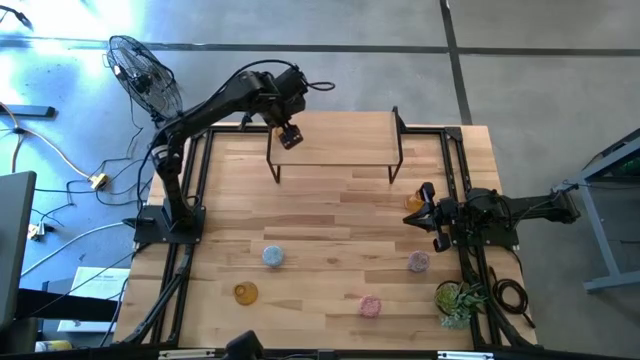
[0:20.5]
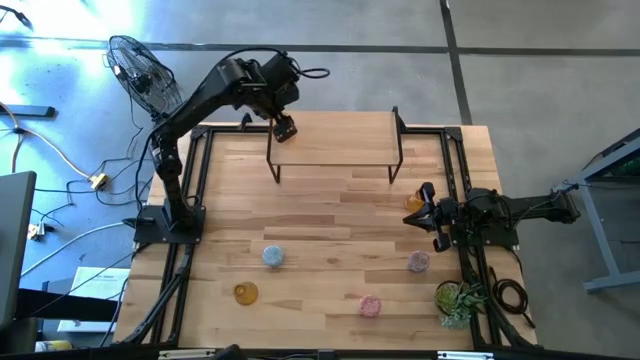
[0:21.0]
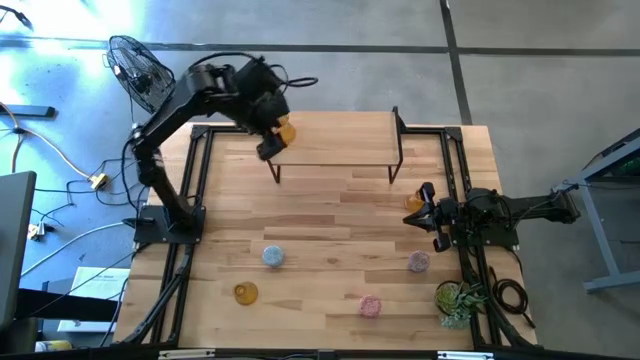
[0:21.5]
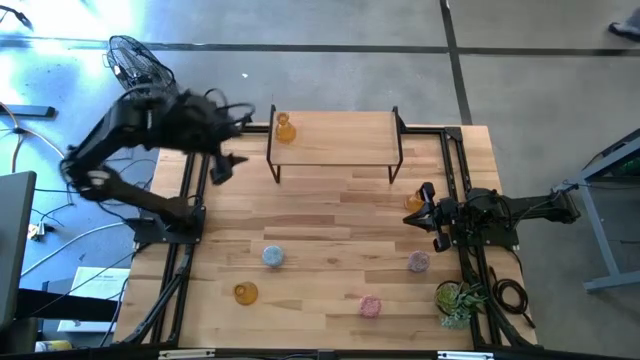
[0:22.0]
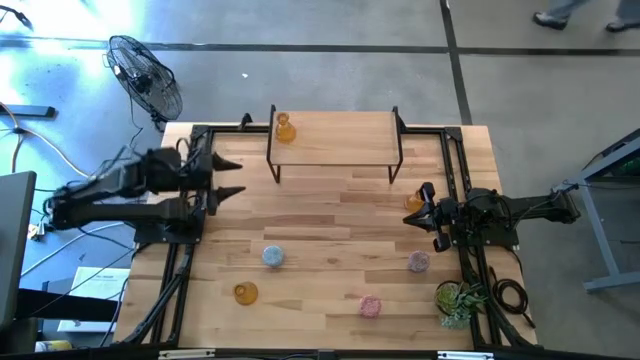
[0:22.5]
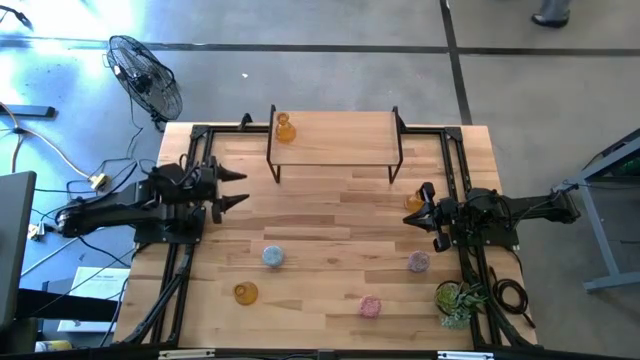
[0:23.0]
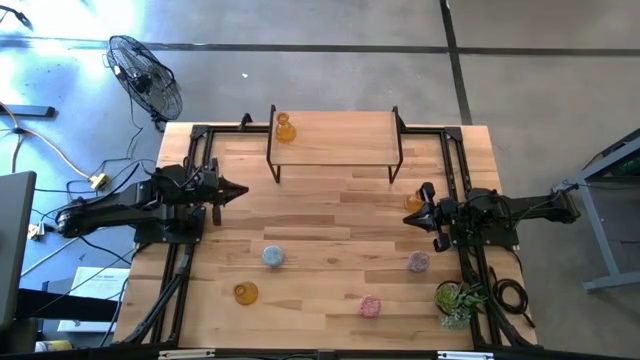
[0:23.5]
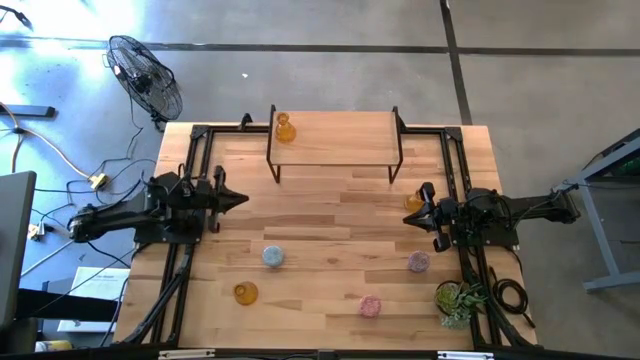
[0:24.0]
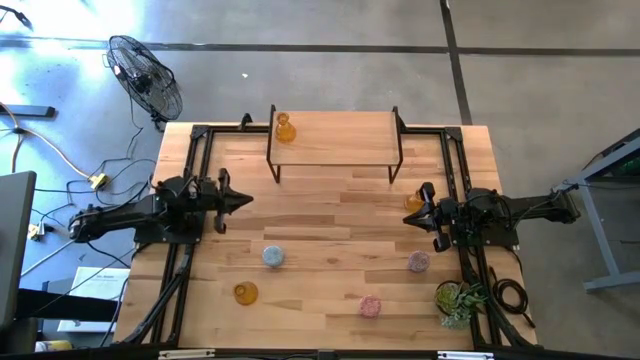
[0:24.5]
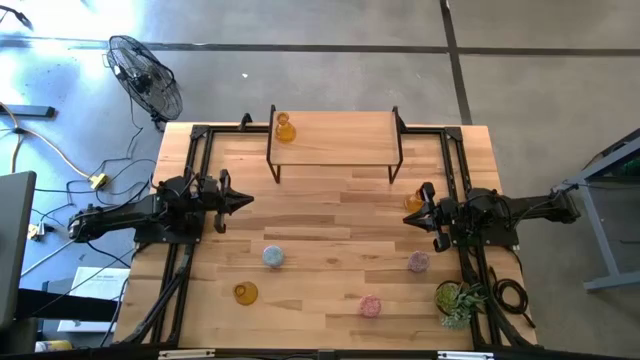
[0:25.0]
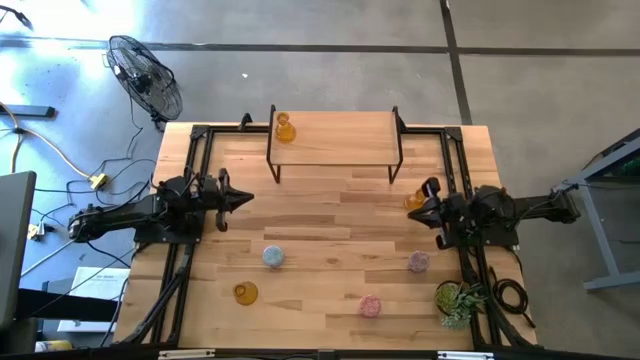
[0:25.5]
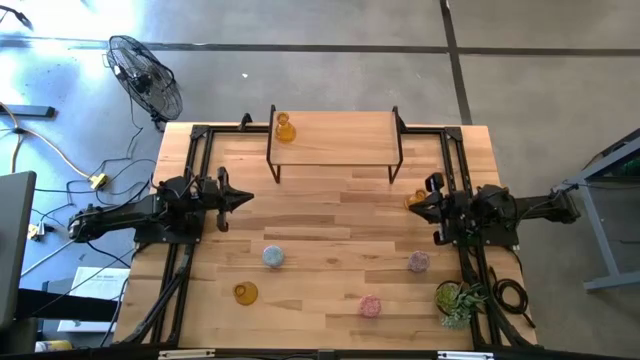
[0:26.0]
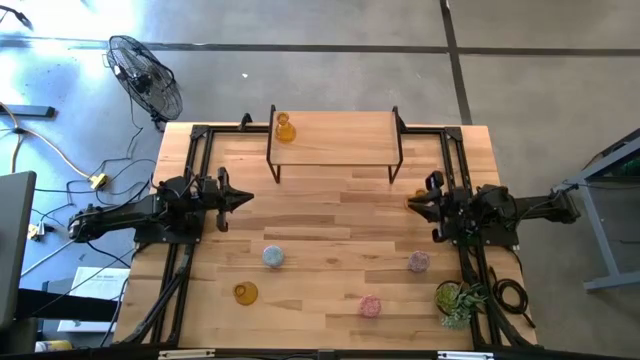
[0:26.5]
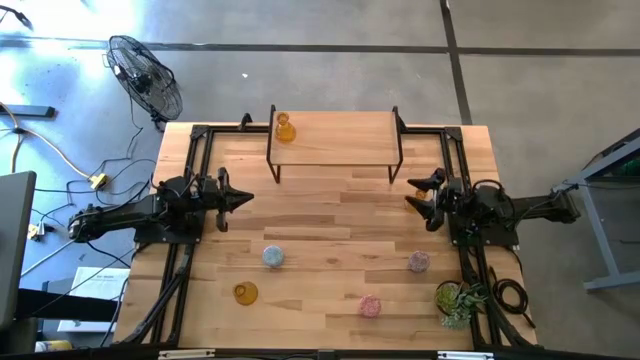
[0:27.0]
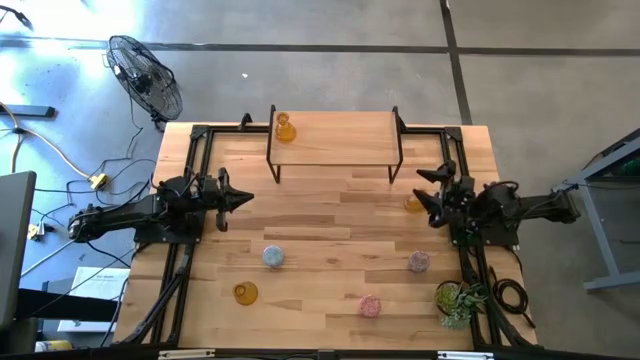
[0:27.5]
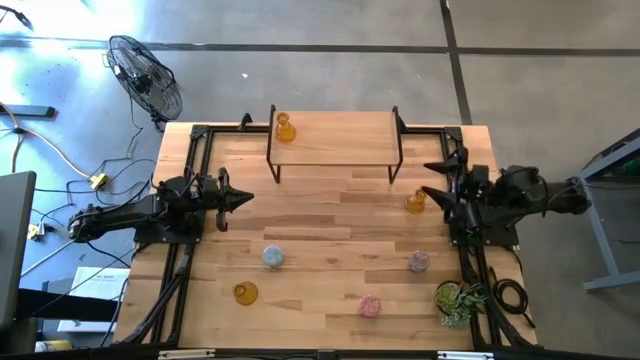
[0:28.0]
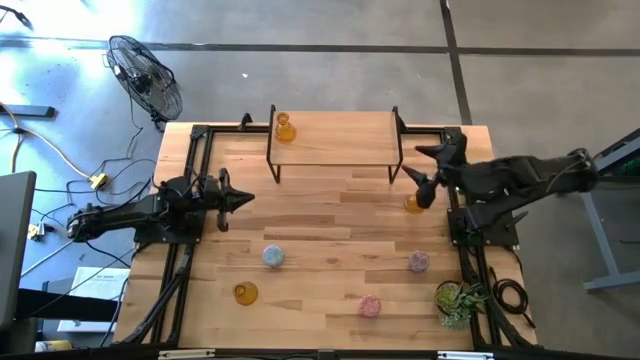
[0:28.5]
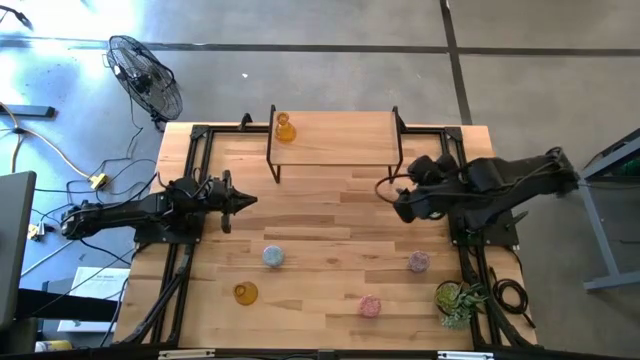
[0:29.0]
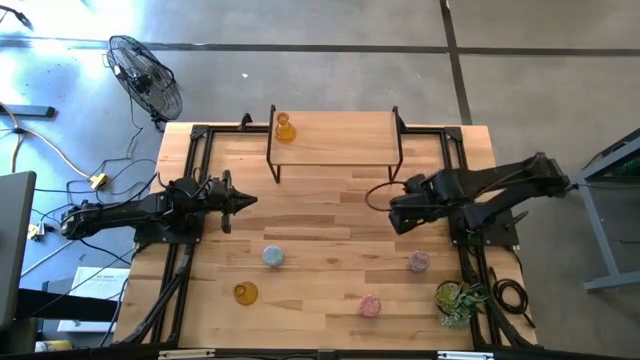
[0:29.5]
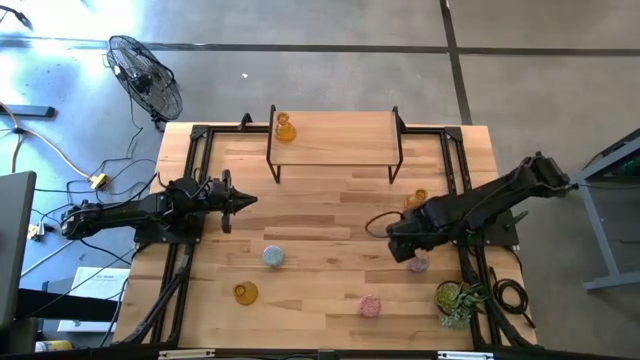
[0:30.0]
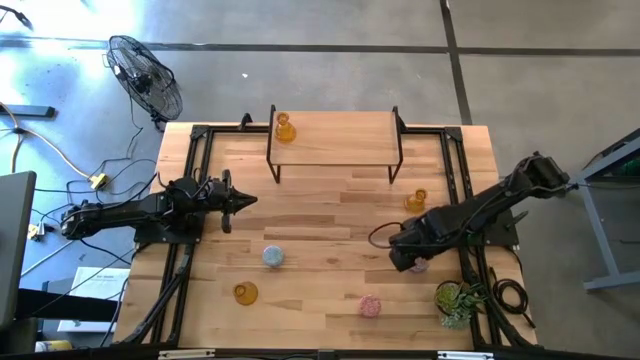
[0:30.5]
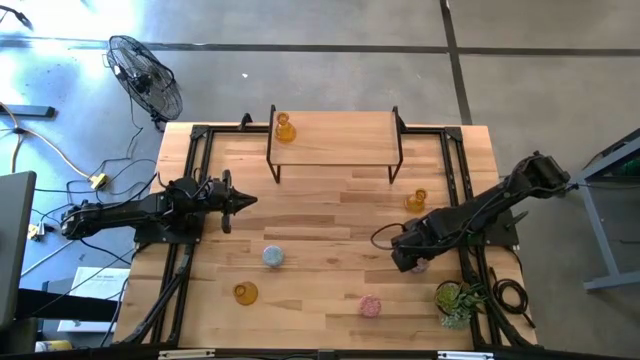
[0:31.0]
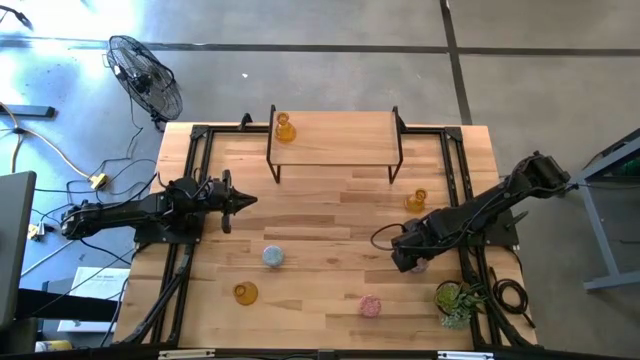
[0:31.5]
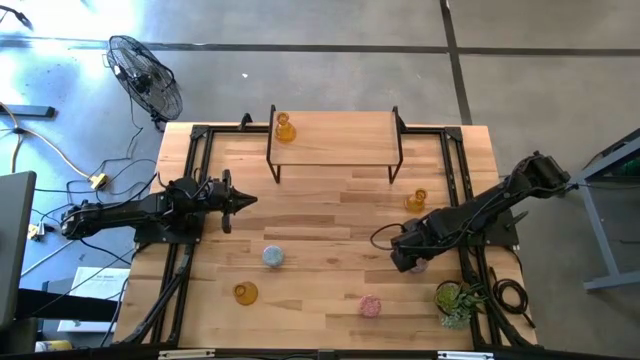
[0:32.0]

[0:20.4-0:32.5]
Task: Pick & Place candle stick holders
Put the red white scented candle on the shelf

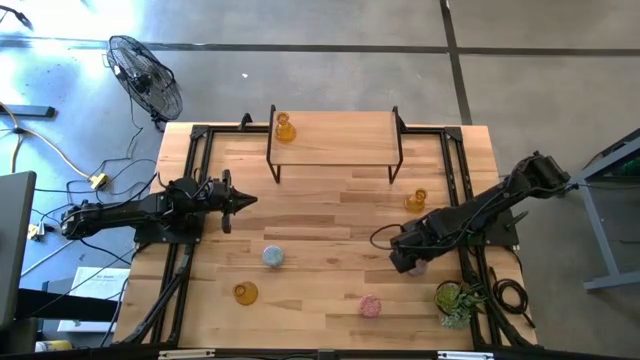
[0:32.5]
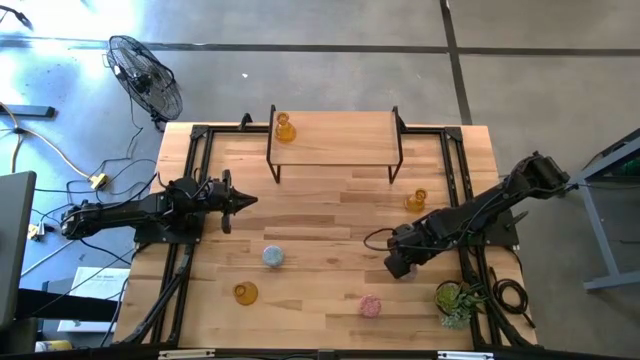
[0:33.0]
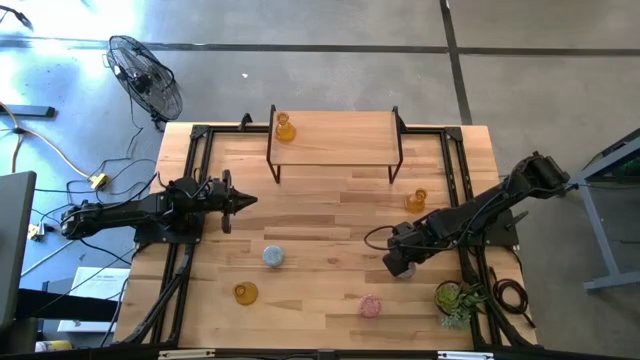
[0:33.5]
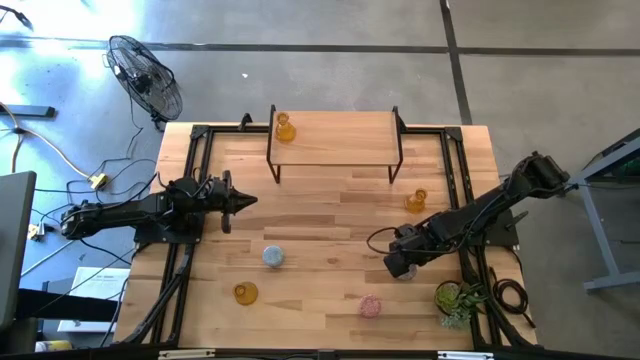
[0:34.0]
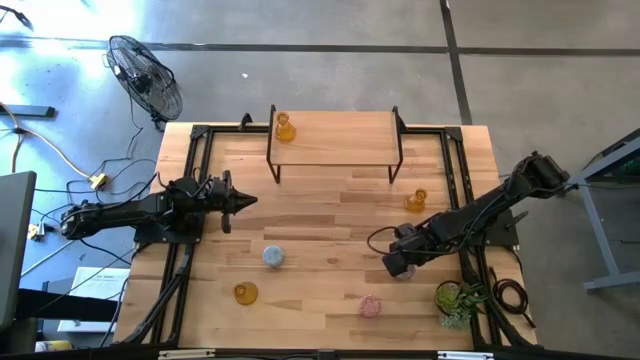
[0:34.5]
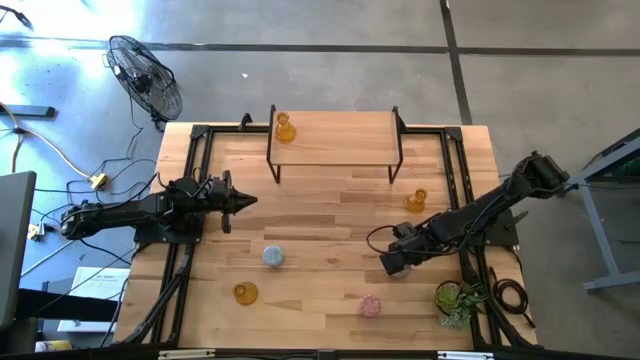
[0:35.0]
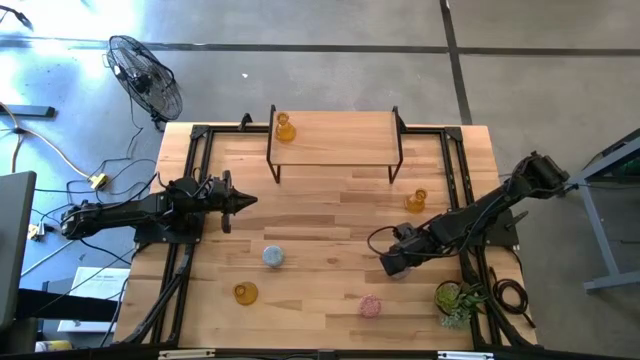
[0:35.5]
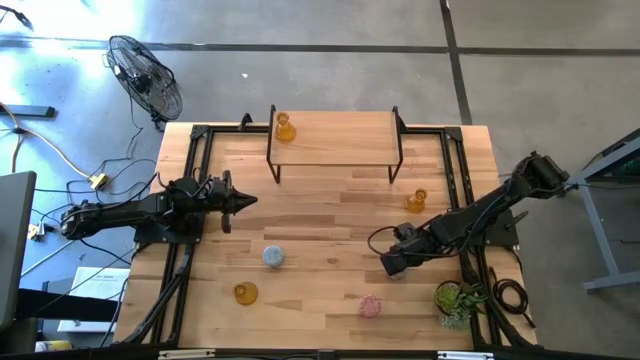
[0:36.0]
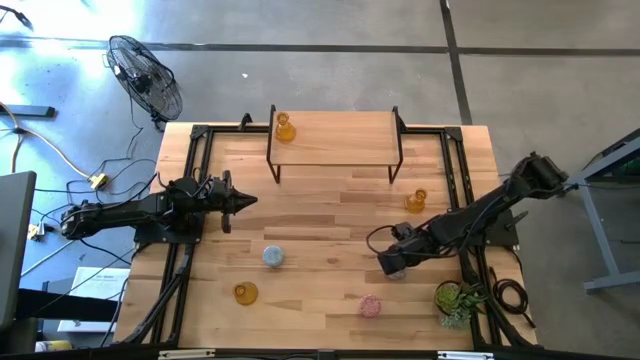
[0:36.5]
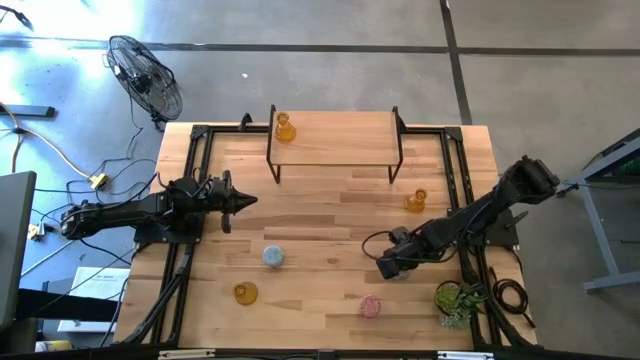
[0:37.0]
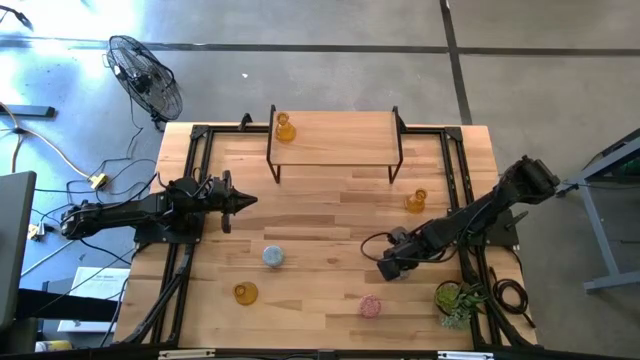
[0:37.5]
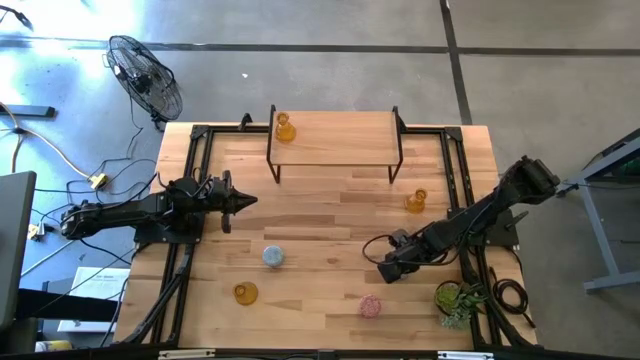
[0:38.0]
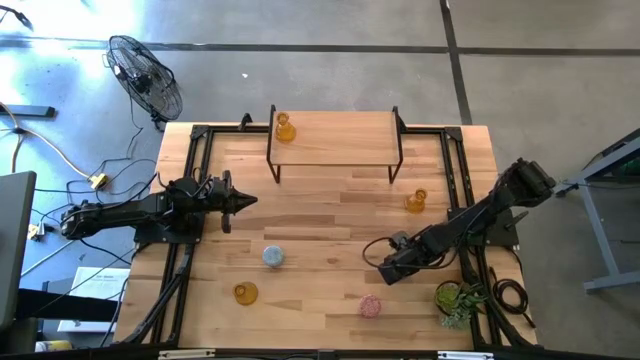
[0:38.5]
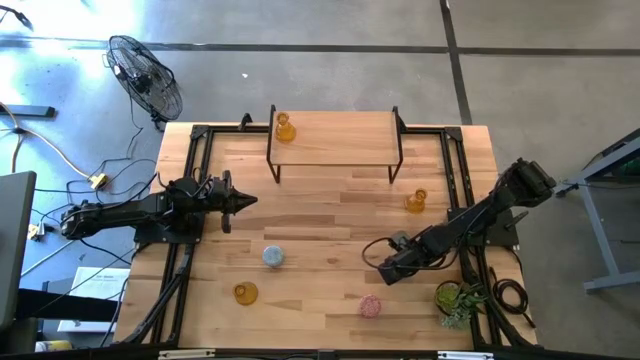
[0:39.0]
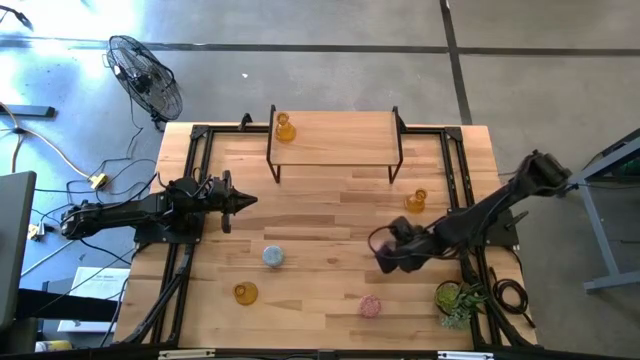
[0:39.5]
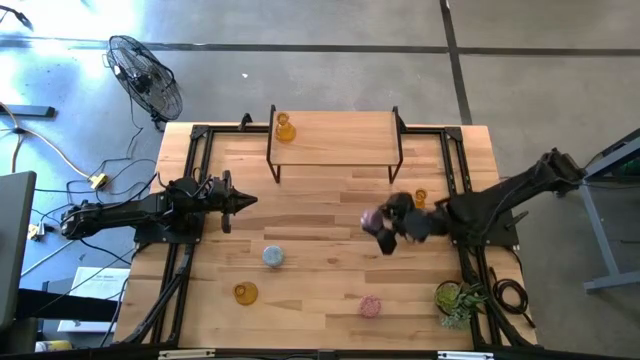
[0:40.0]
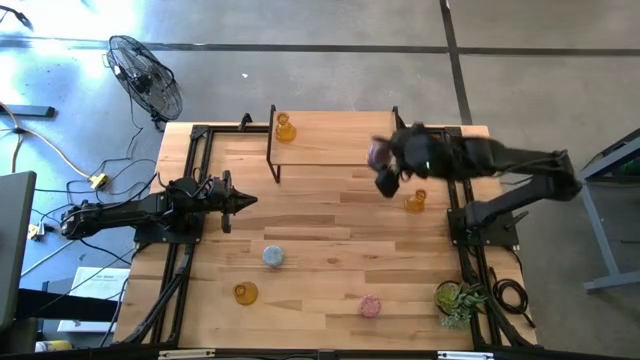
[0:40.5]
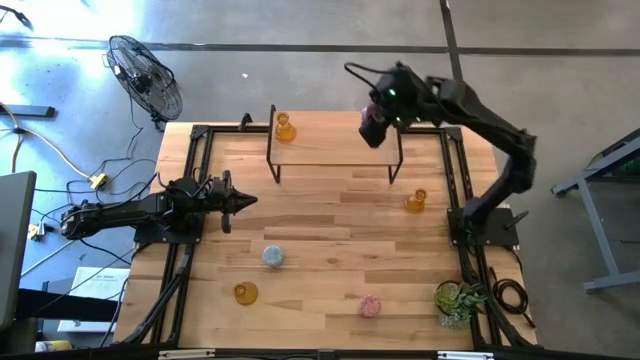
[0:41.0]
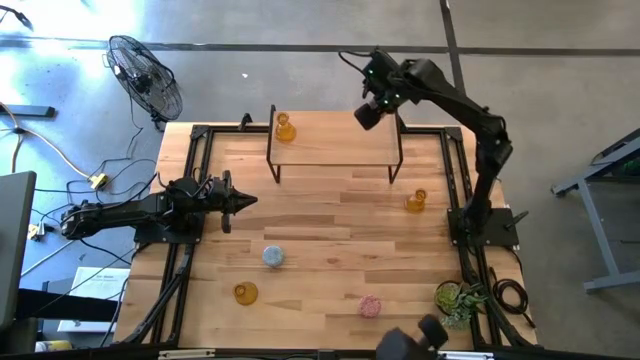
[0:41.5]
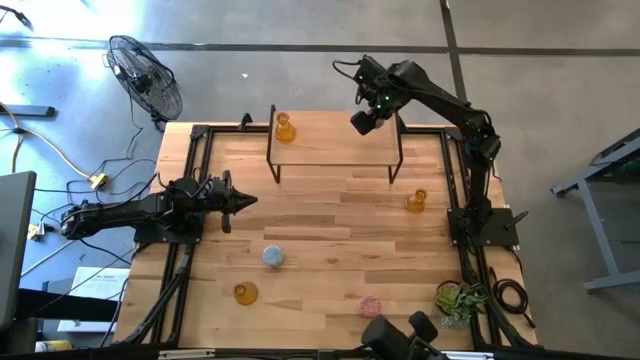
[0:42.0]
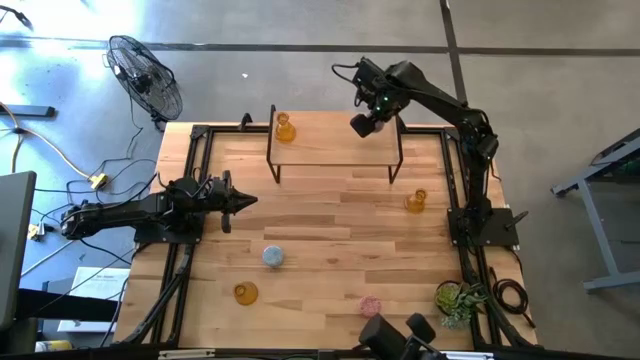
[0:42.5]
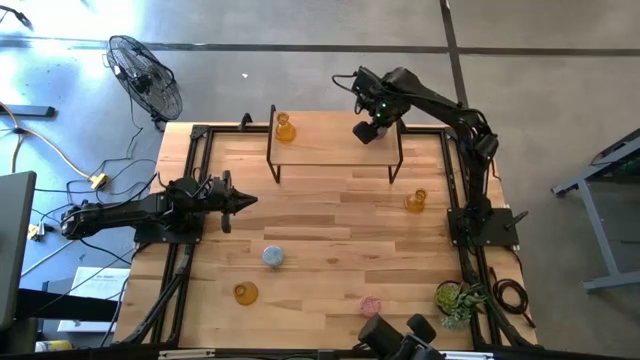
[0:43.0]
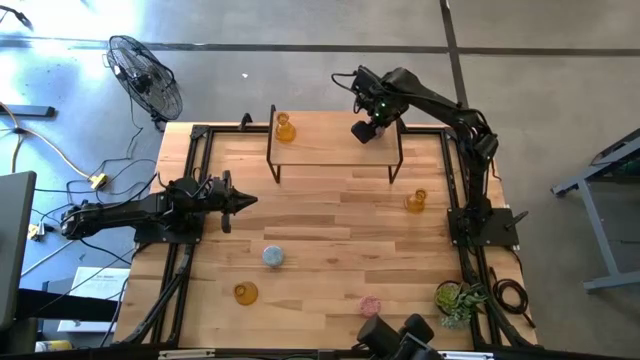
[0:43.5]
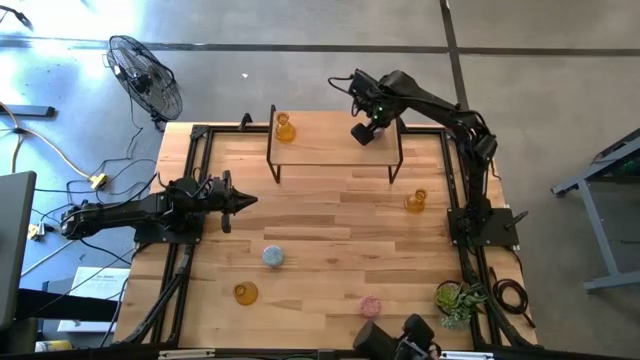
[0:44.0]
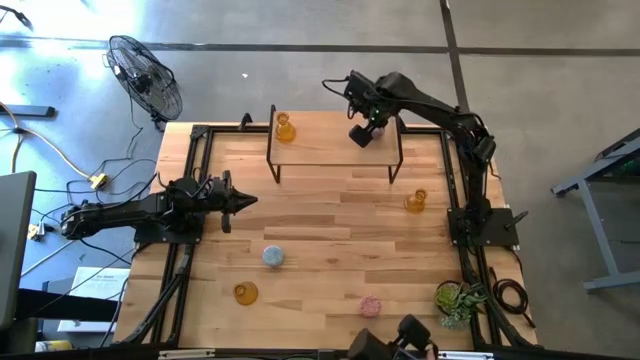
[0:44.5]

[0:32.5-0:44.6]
Put the red white scented candle on the shelf
